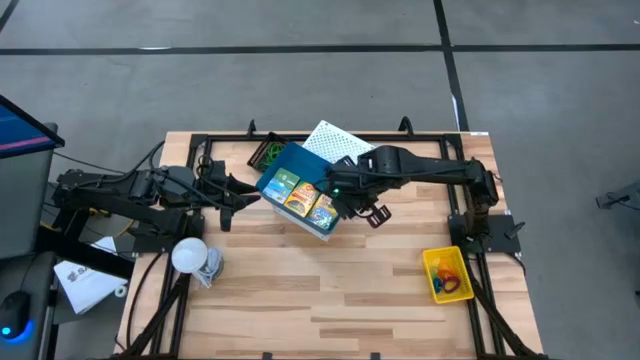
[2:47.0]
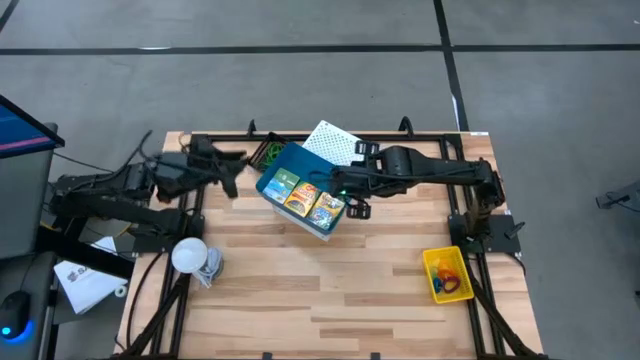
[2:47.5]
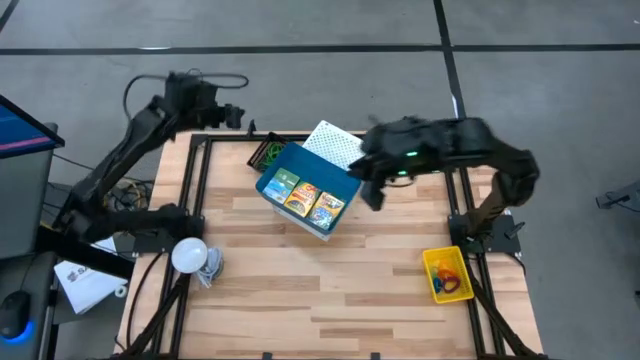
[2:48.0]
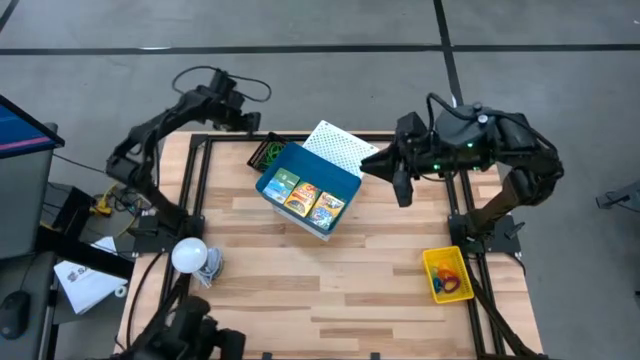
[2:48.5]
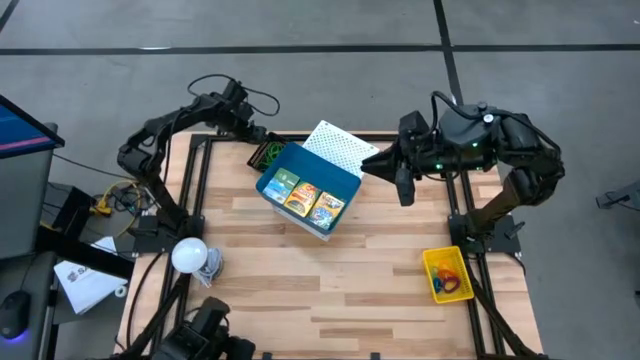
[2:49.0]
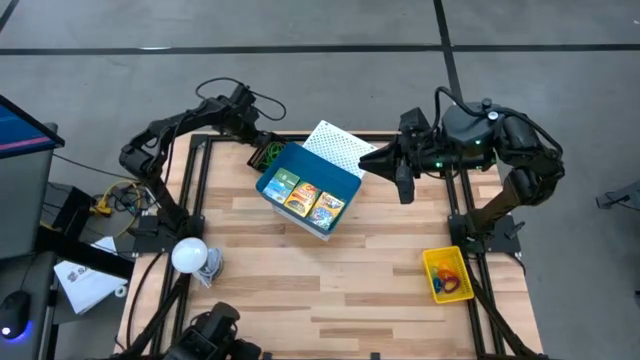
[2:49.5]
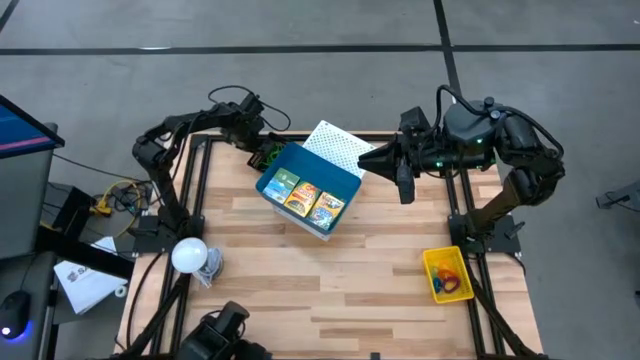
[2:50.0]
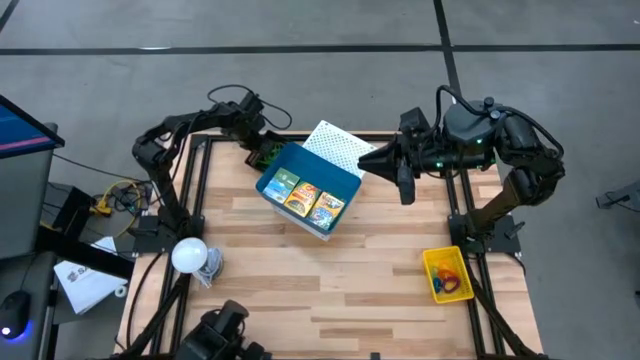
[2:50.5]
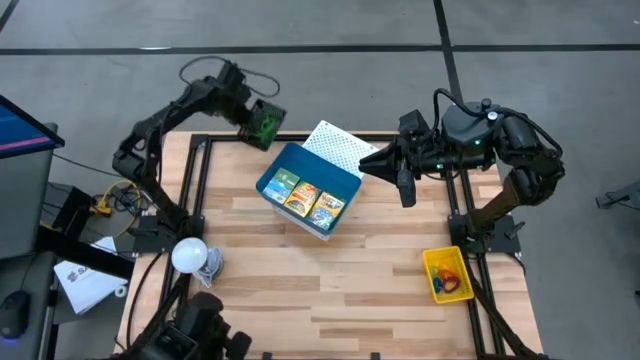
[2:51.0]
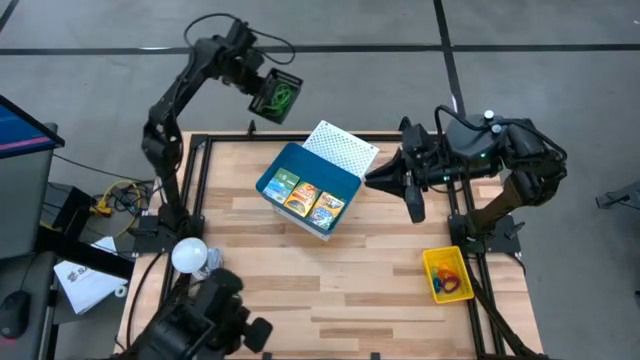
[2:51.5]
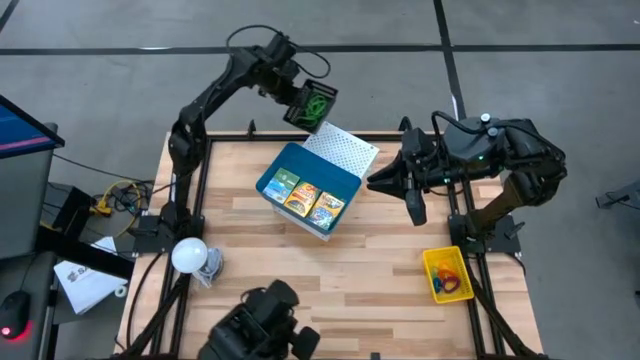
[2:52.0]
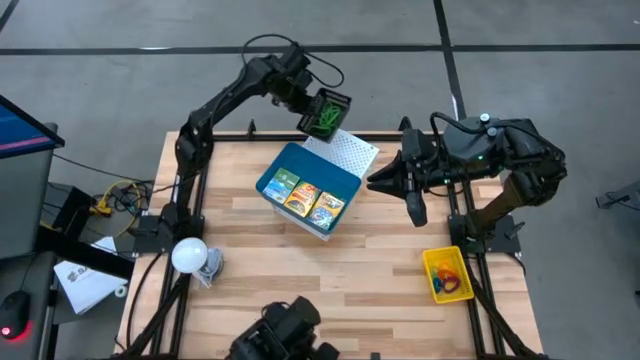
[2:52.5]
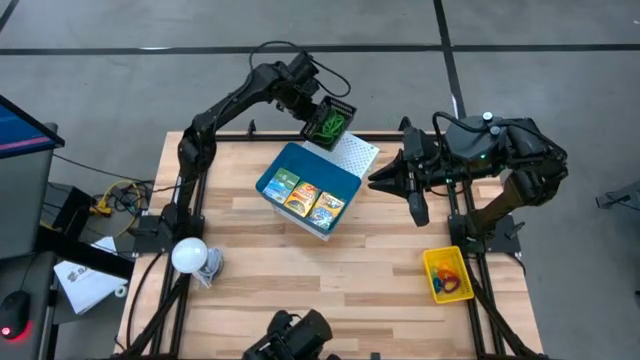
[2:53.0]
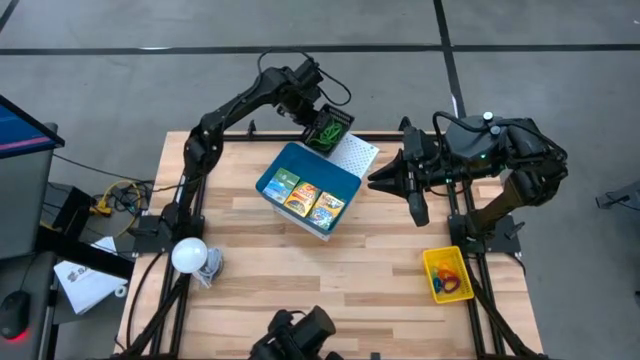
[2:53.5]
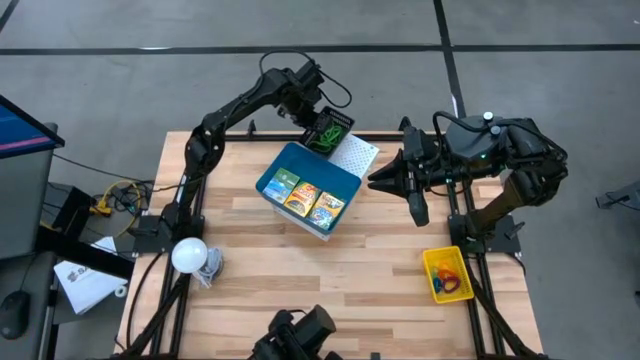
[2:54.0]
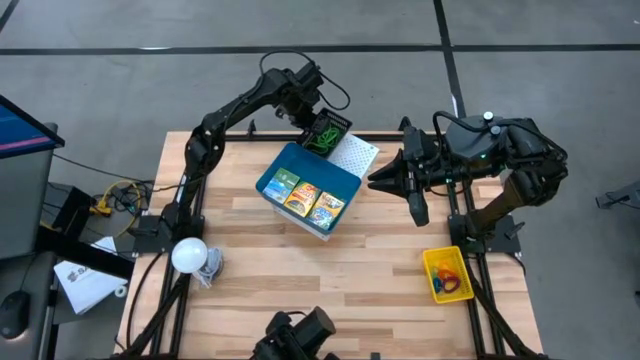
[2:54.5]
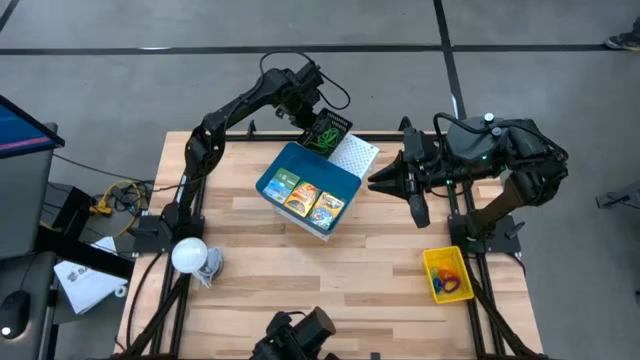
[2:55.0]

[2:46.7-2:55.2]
Task: Pick & Place Office Desk Supplies
Put the black bin with rubber bands on the shelf

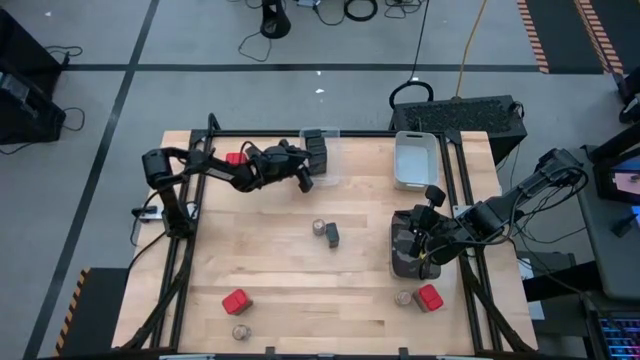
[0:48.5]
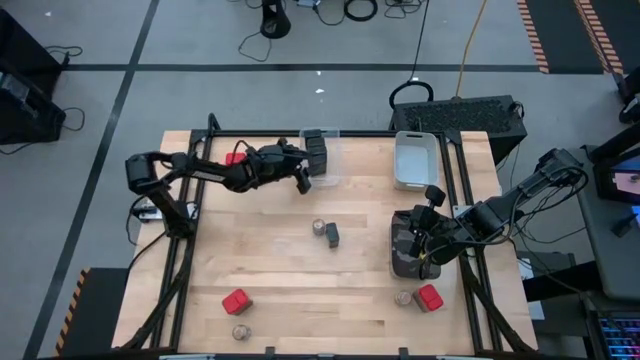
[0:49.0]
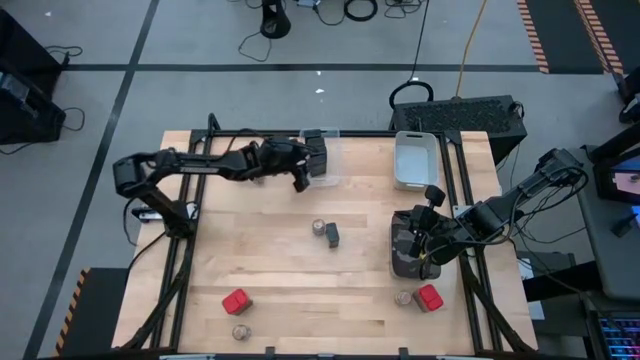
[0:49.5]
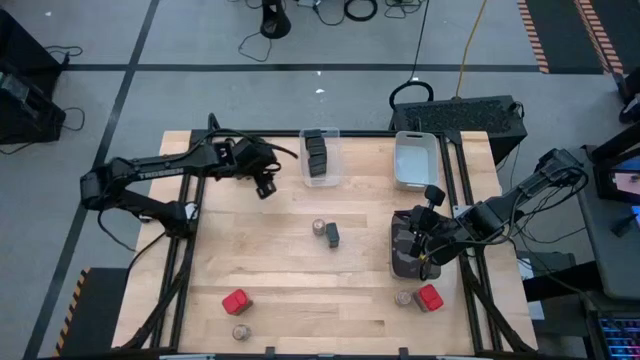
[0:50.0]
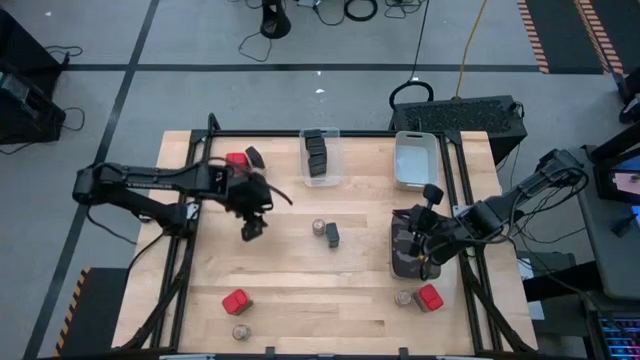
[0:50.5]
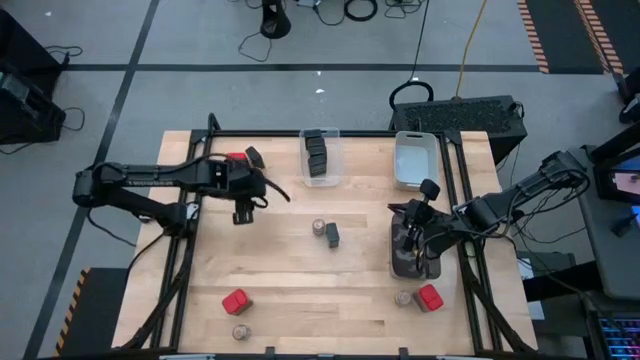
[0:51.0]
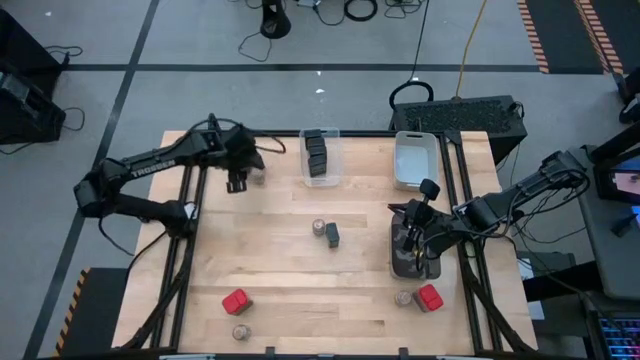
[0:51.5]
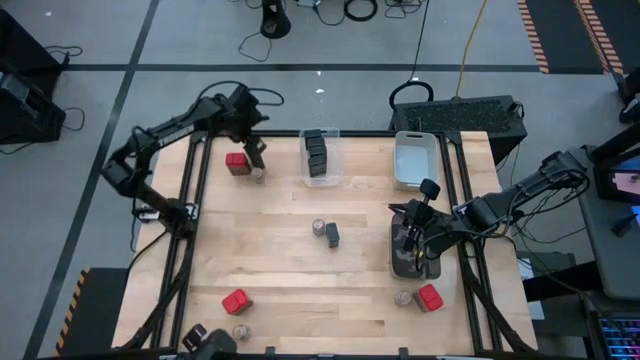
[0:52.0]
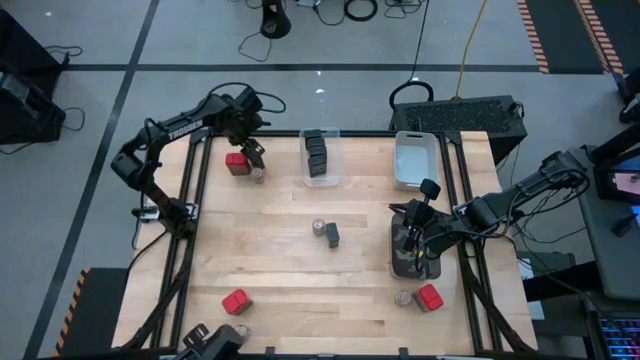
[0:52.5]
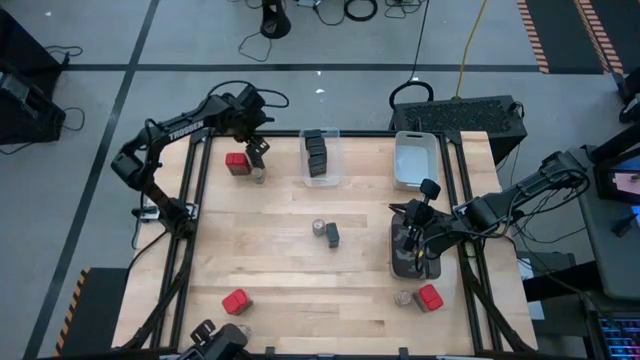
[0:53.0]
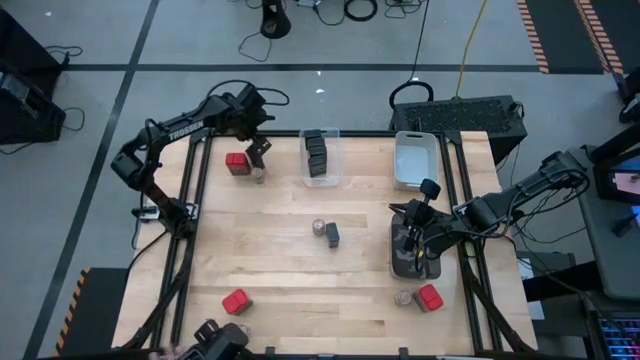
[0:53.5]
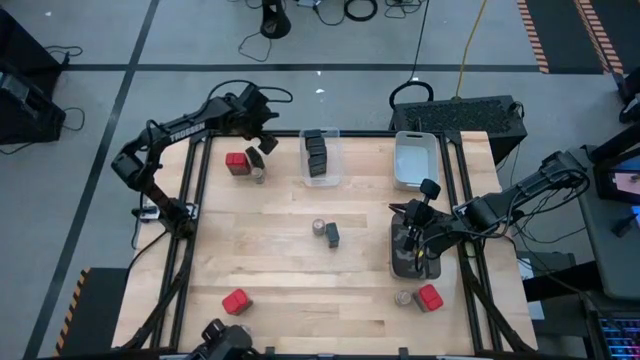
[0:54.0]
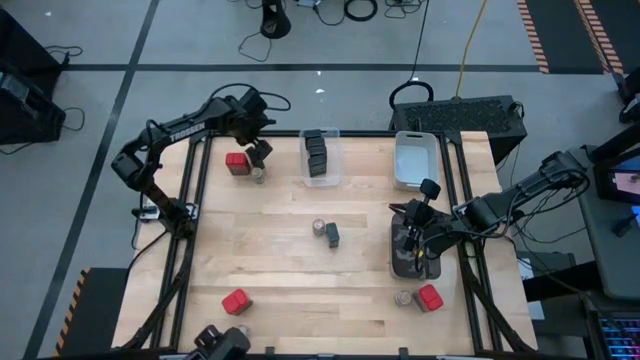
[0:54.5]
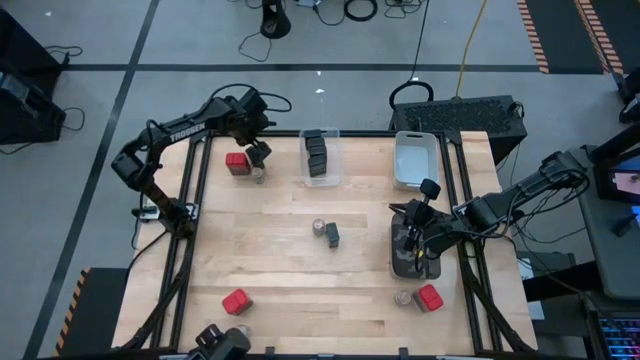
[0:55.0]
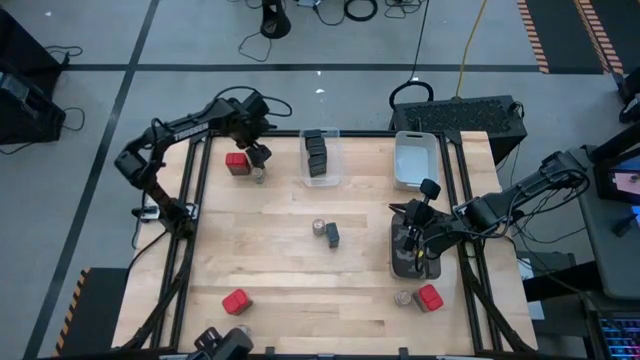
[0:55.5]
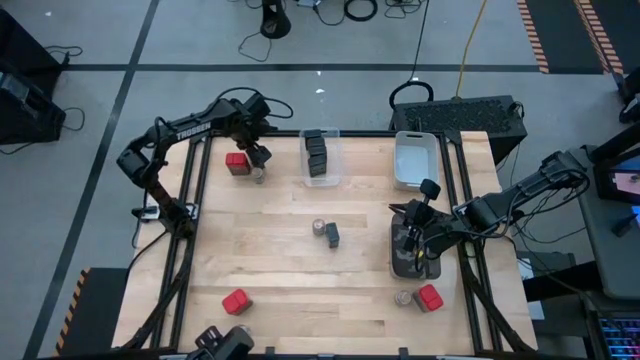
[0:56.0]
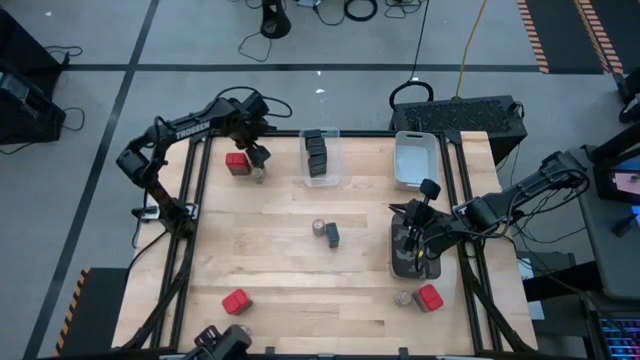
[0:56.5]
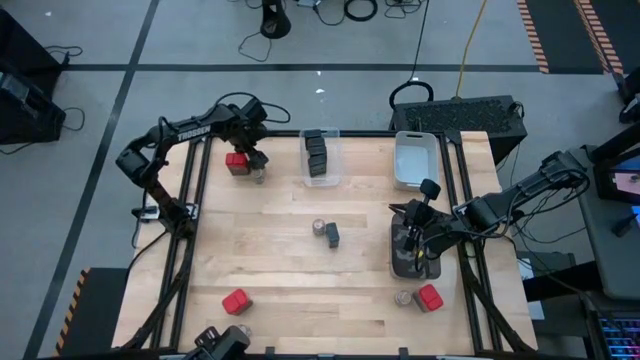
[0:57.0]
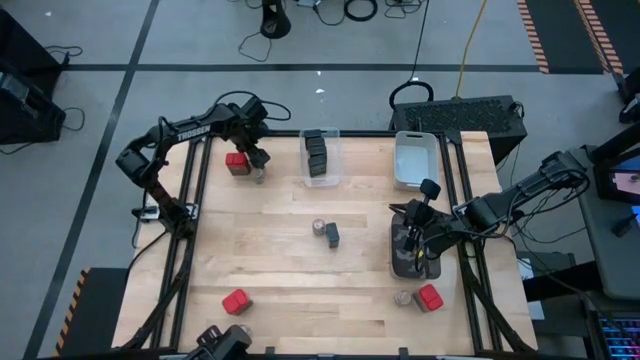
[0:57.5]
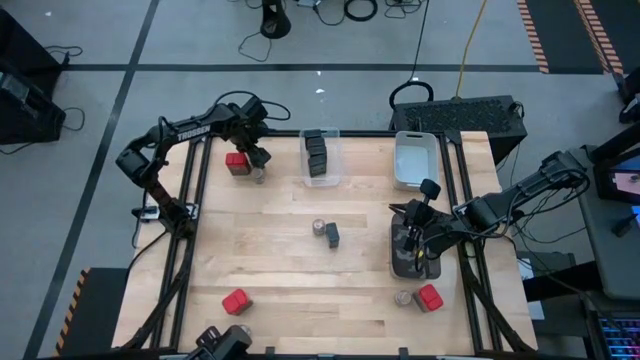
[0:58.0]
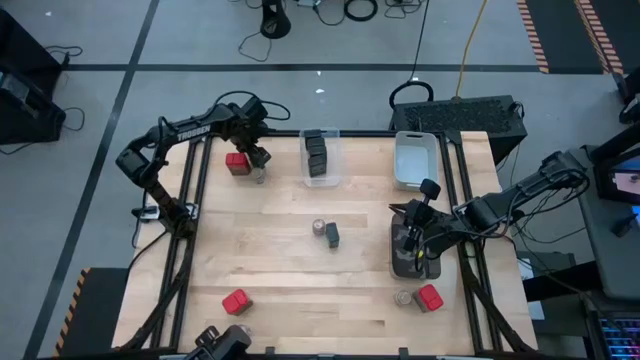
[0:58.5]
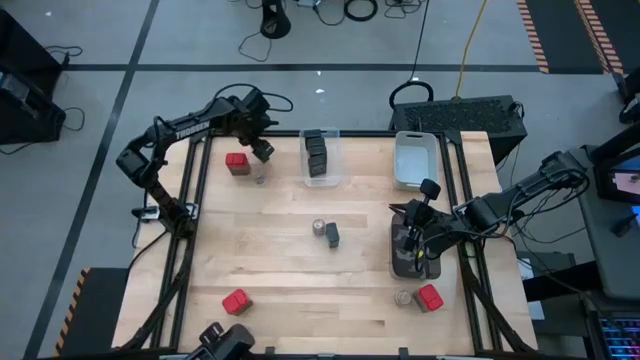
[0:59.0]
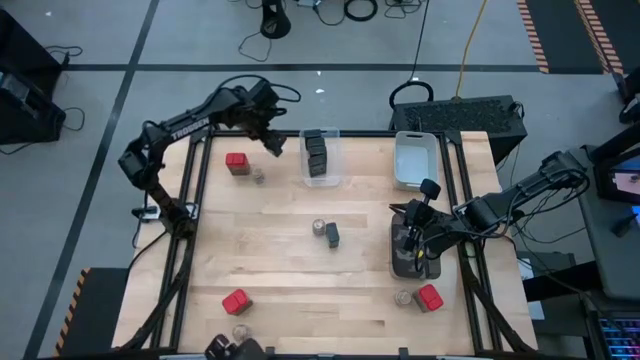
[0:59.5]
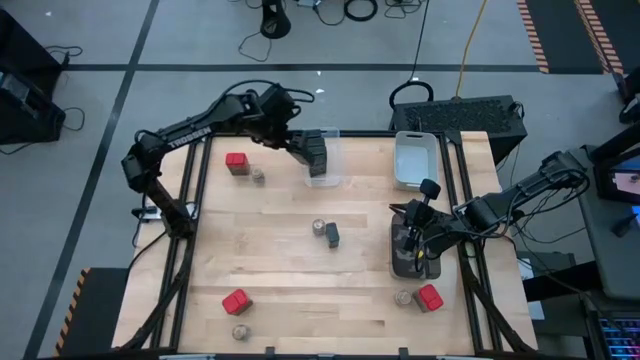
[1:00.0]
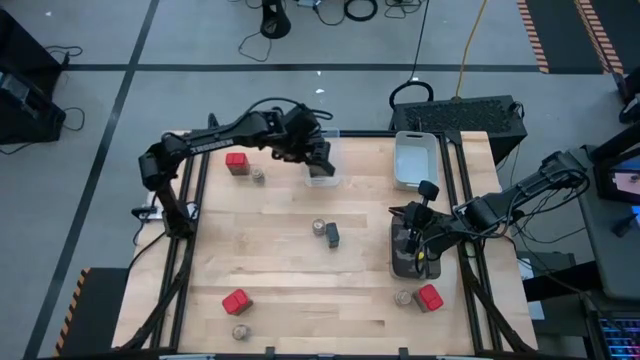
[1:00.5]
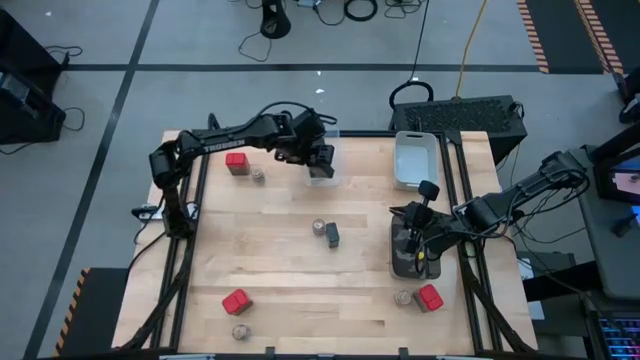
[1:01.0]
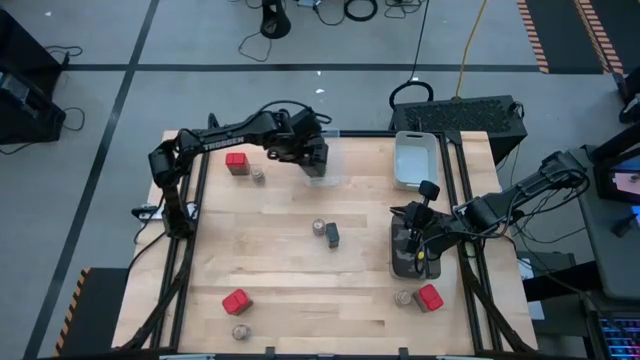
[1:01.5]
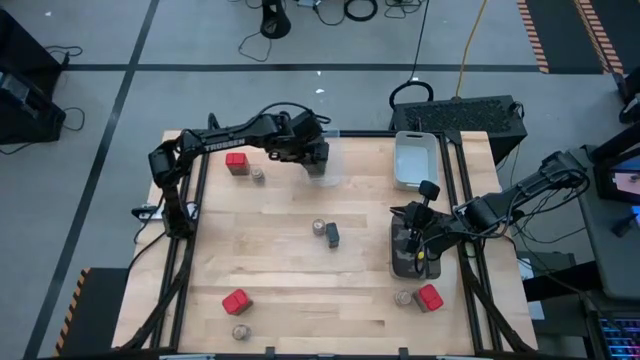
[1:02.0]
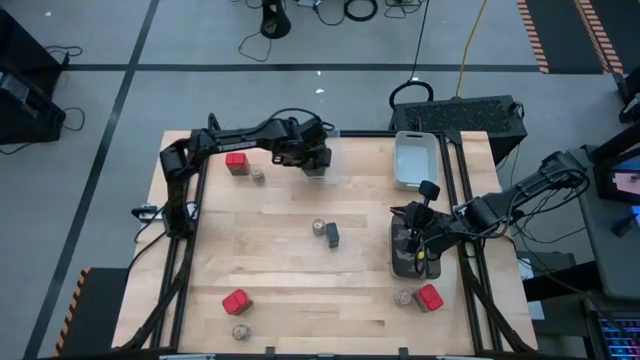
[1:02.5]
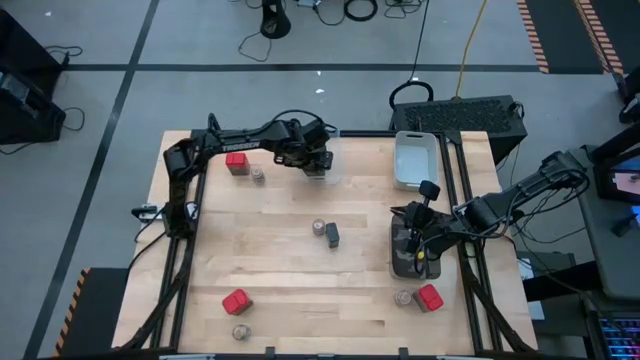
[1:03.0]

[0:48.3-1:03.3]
Task: Sort spices by type
Put the black seasoning can into the transparent bin
